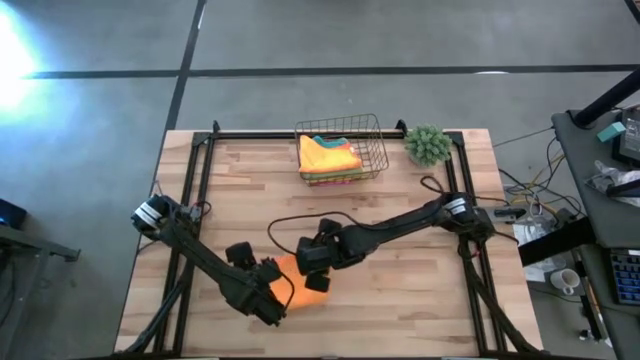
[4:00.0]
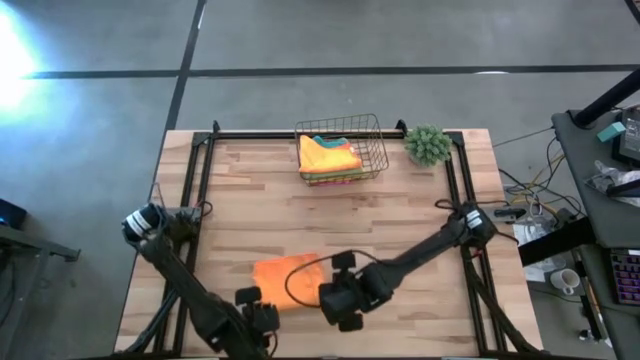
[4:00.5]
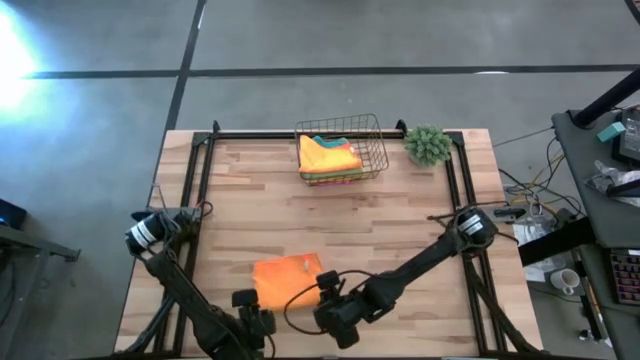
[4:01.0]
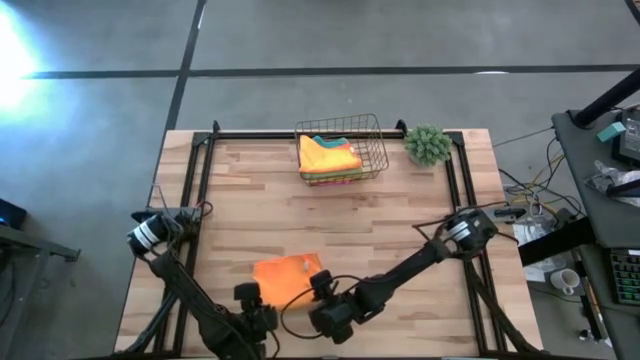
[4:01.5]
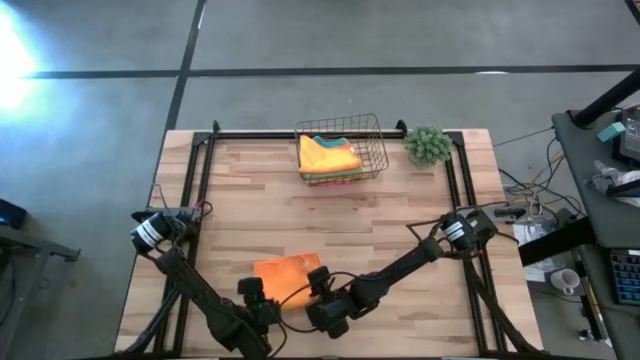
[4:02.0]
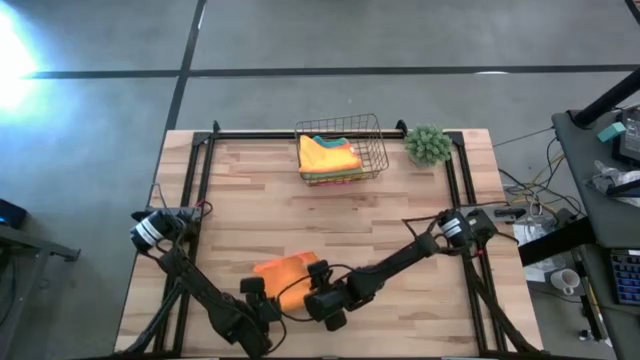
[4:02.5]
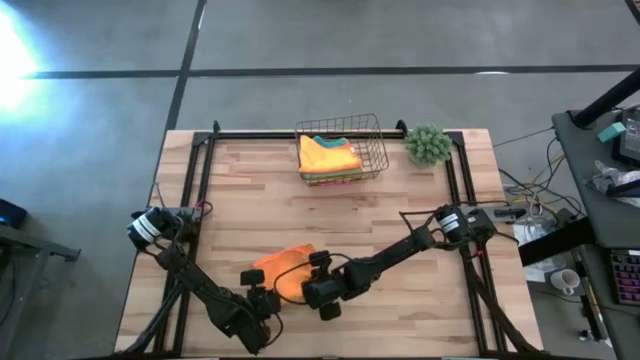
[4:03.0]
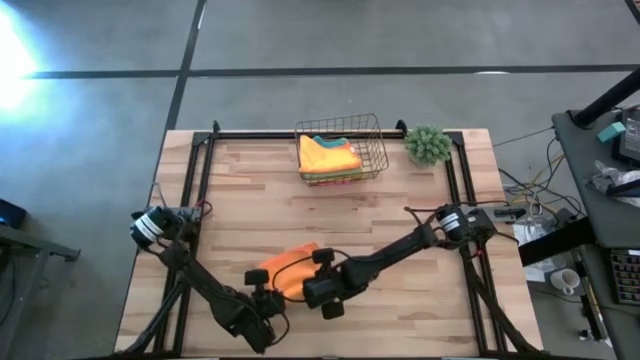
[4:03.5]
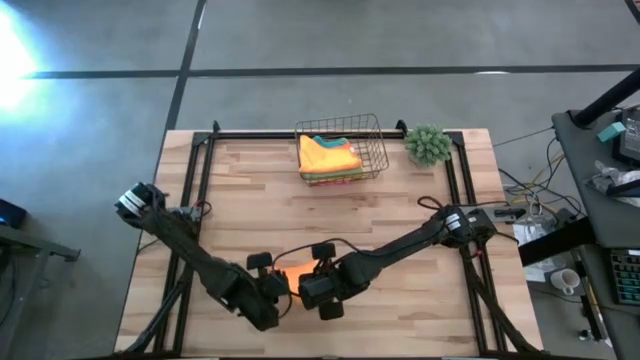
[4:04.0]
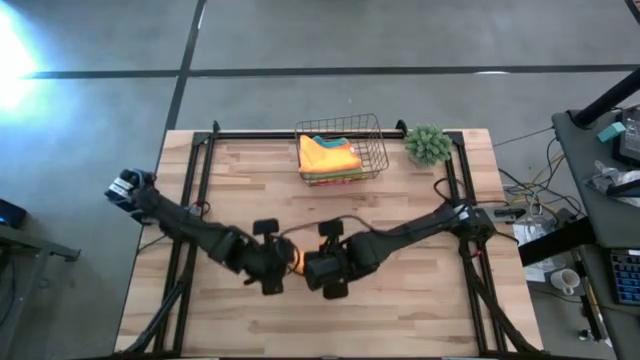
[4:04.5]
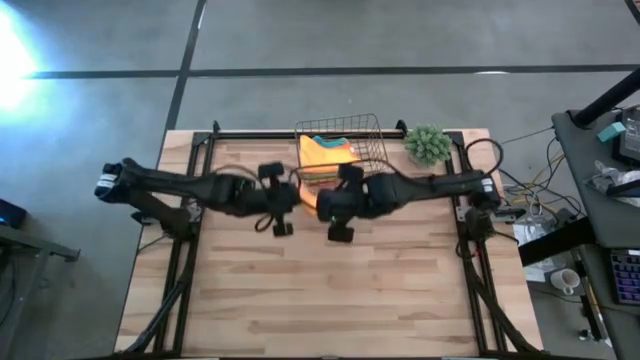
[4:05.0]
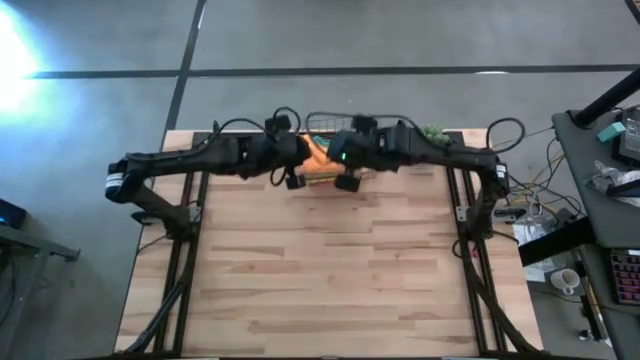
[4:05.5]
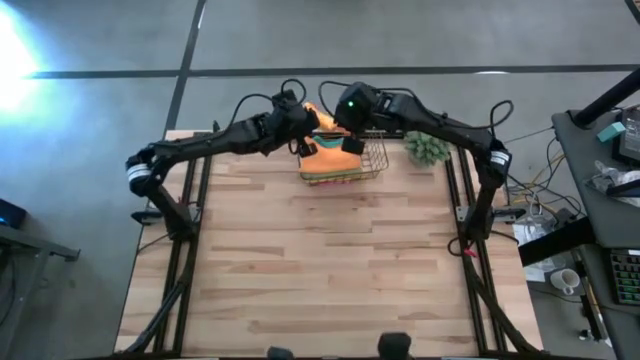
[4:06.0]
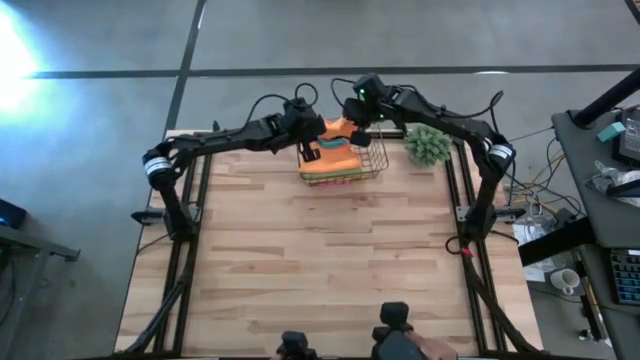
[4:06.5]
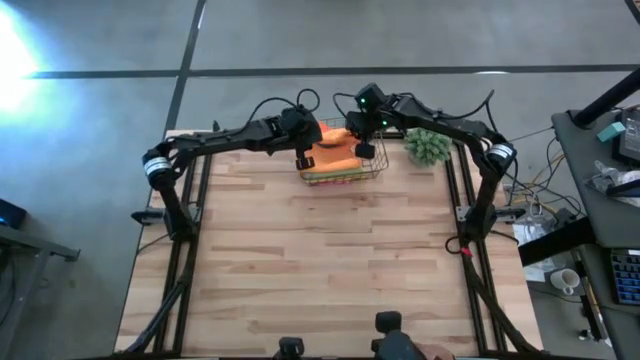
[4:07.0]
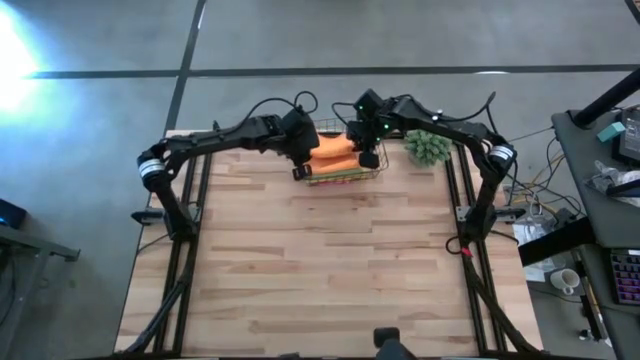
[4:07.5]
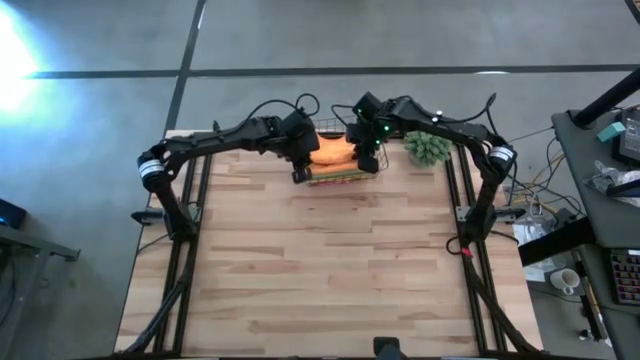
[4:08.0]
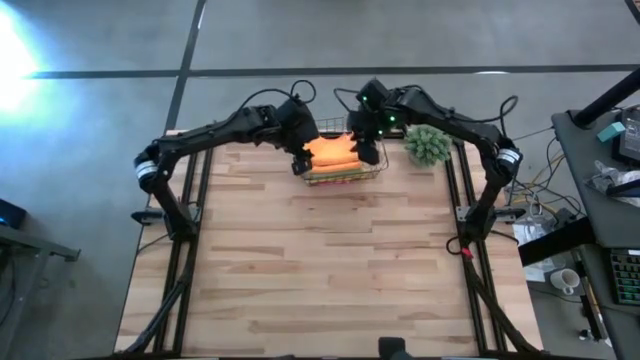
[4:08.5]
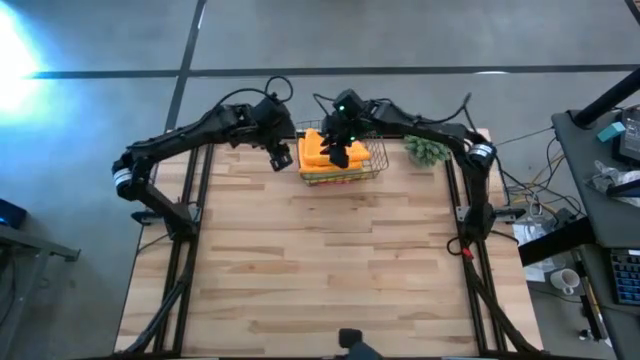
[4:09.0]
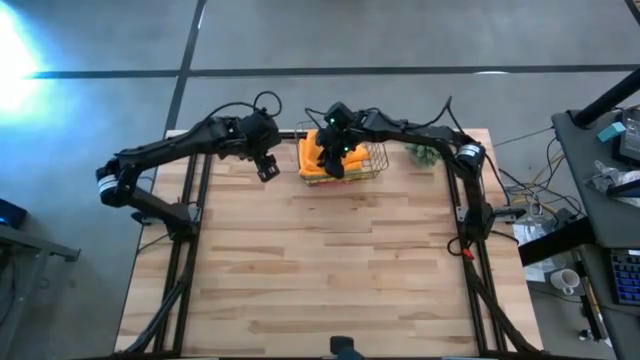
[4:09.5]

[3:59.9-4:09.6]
Task: Fold microfiber towels
Put the folded orange microfiber cloth into the gold wire basket

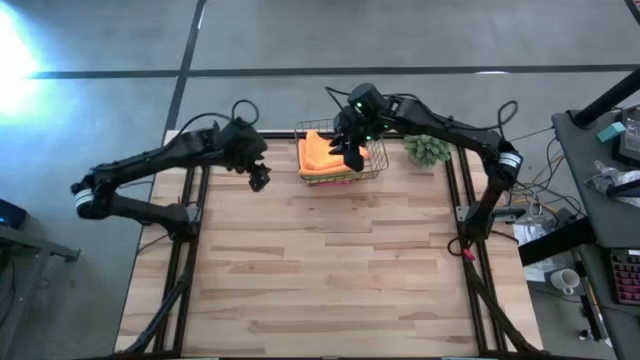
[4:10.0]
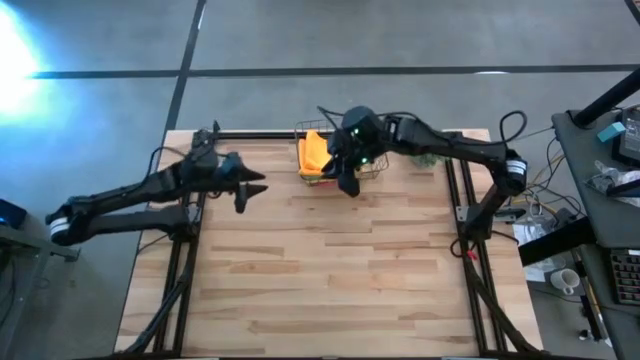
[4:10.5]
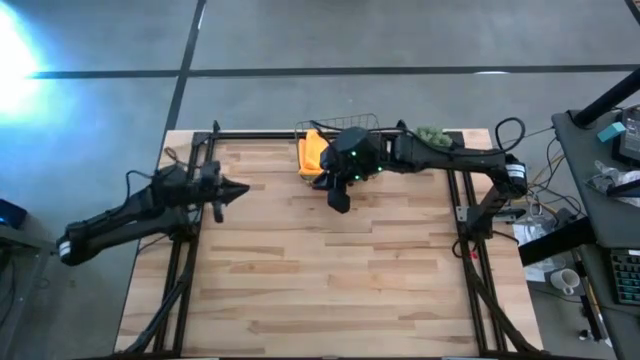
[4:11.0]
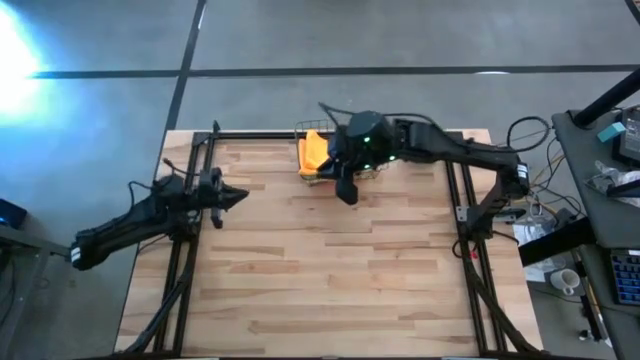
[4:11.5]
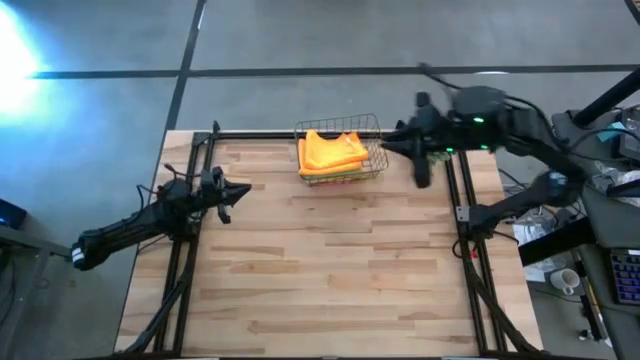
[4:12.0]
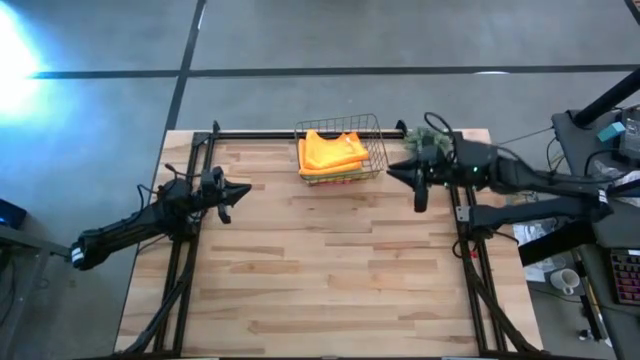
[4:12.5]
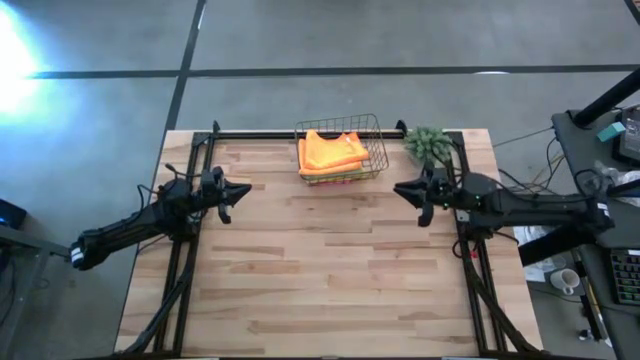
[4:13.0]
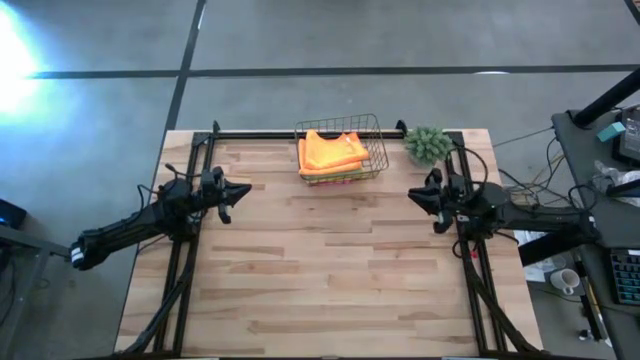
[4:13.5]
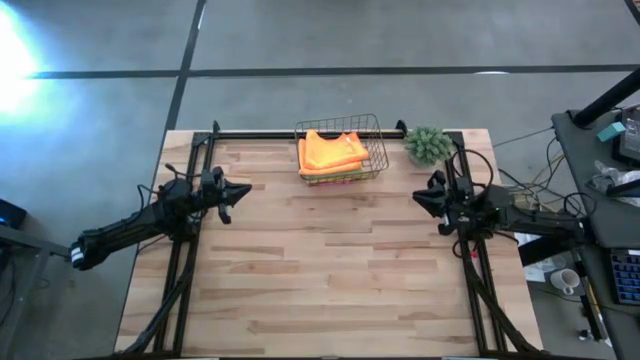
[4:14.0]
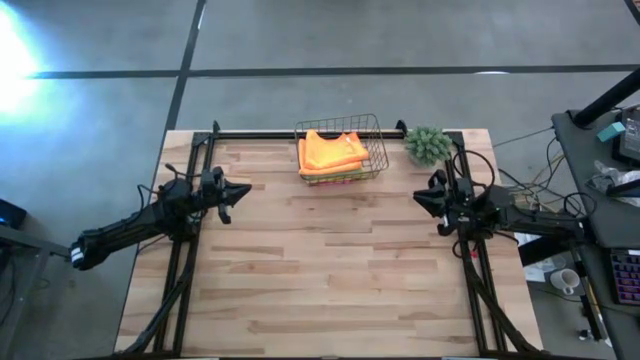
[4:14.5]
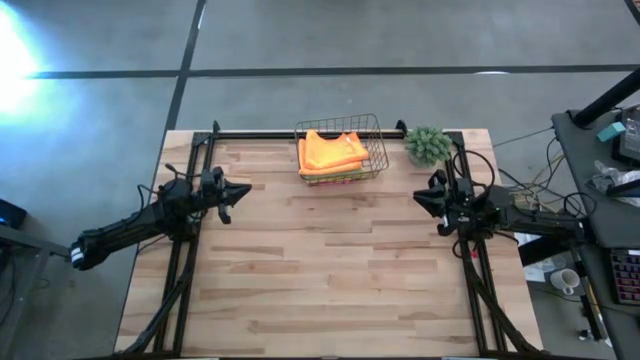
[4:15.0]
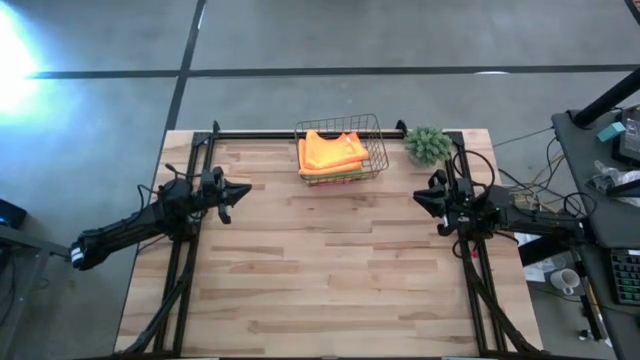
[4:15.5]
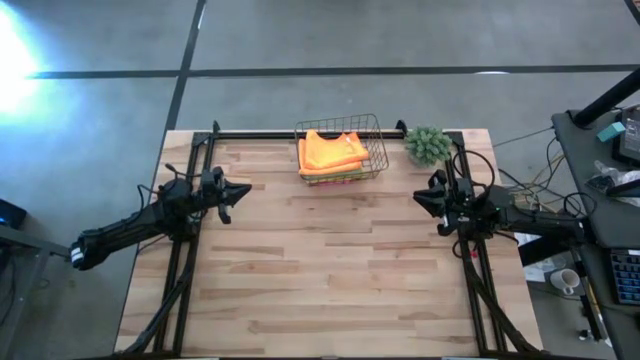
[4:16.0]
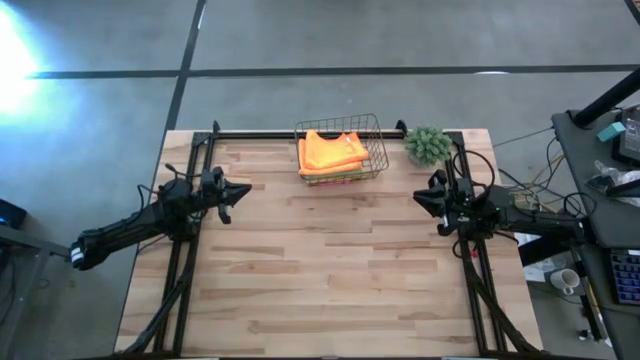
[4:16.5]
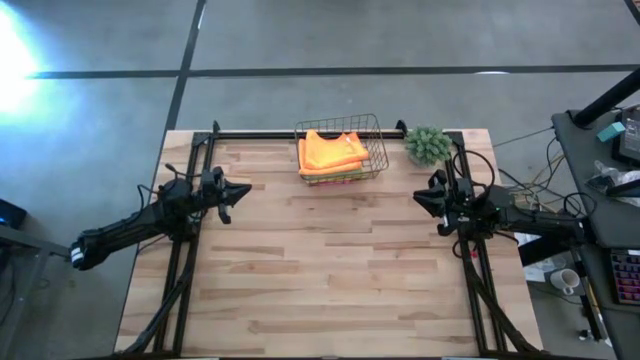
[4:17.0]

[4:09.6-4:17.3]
Return to Home Position

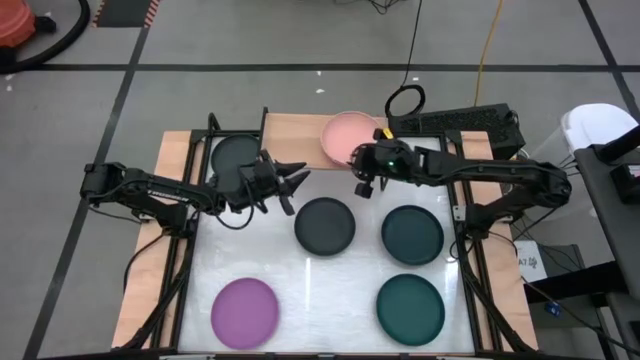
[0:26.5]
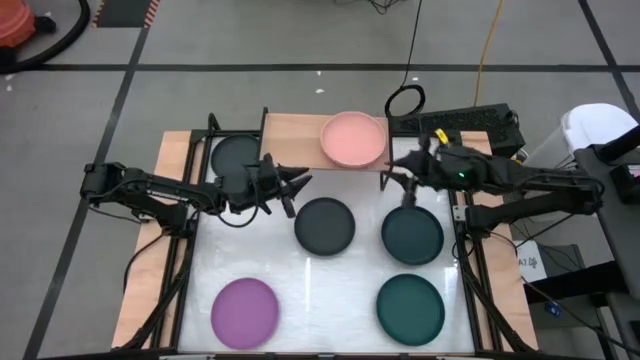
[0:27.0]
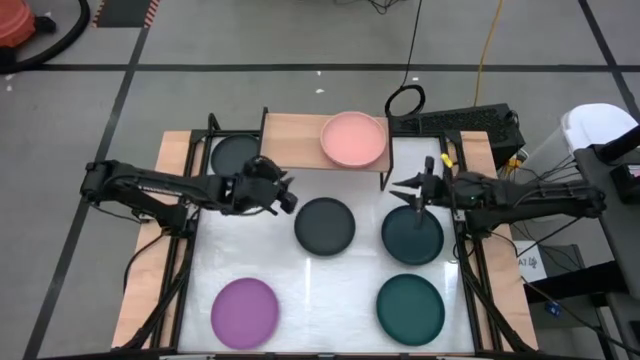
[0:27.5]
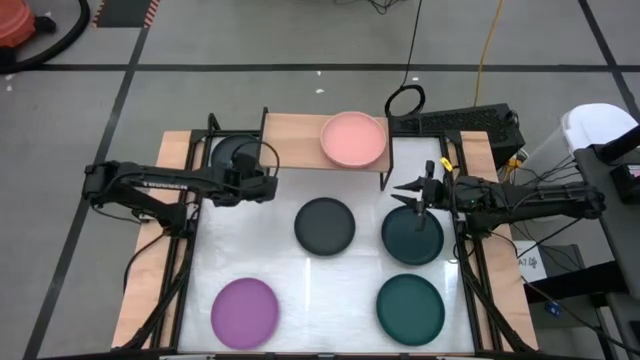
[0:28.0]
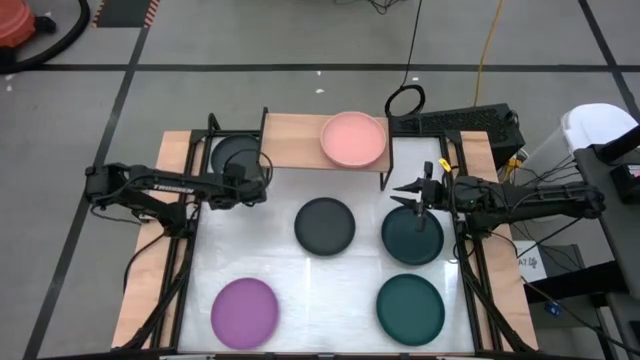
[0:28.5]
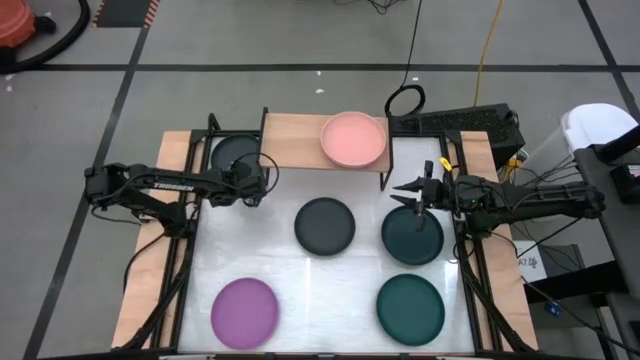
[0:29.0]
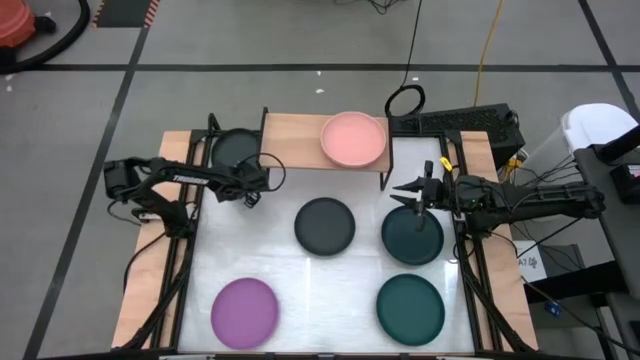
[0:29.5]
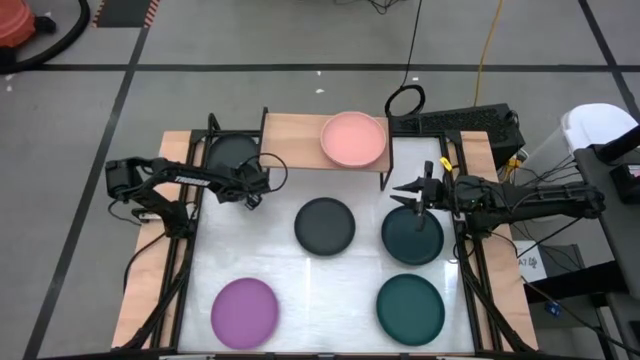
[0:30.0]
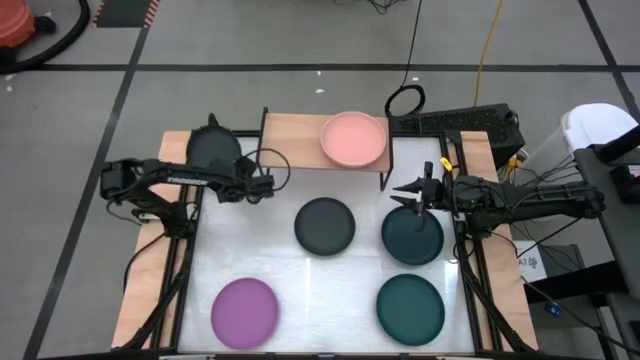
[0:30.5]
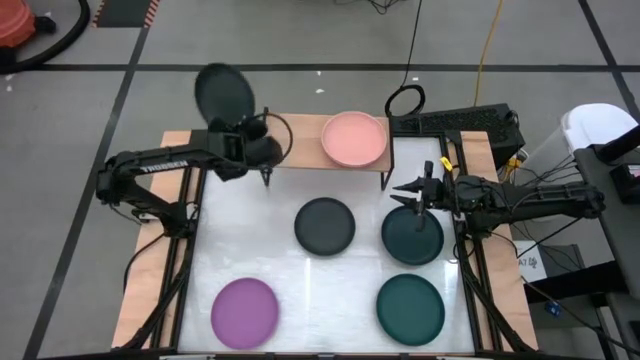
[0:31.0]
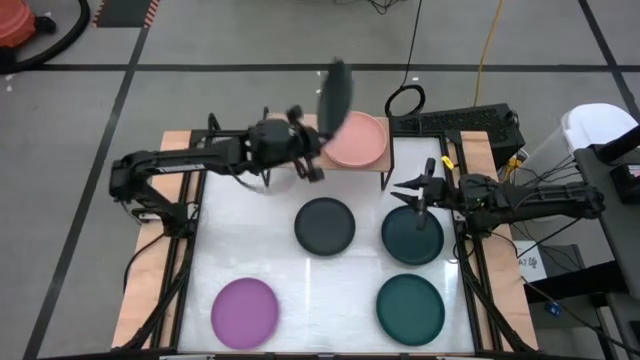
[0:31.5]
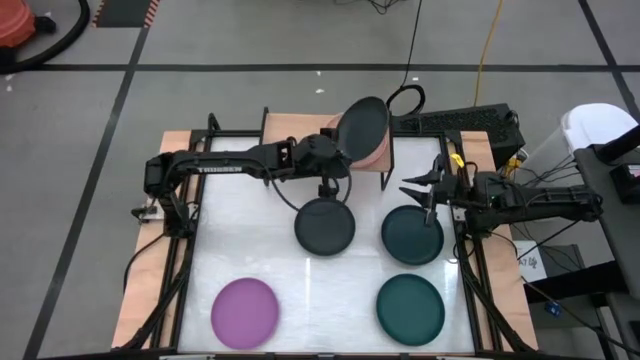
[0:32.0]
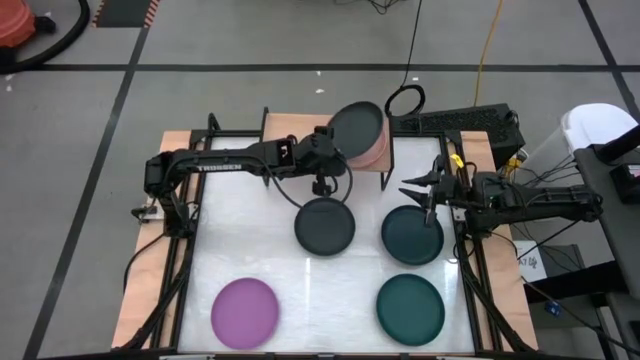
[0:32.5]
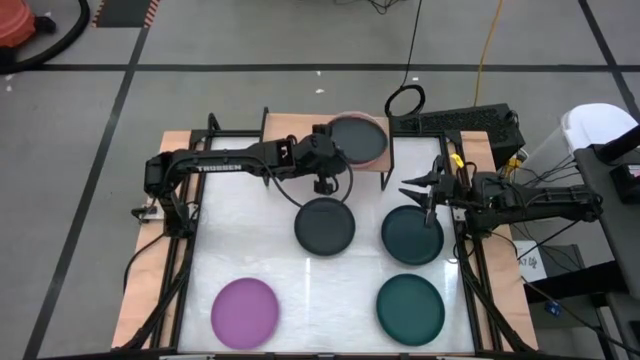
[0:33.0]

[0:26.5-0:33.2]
Task: Place and stack plates onto a shelf
Stack the top black plate on top of the light orange plate on the shelf
